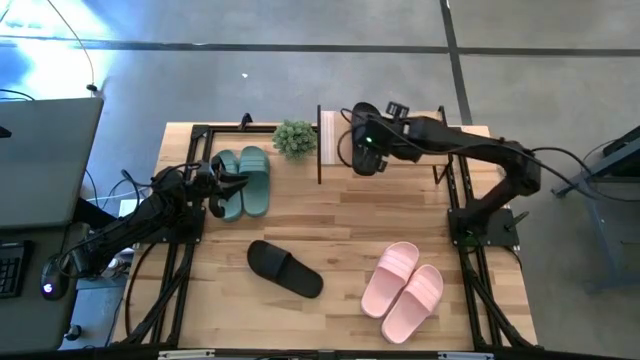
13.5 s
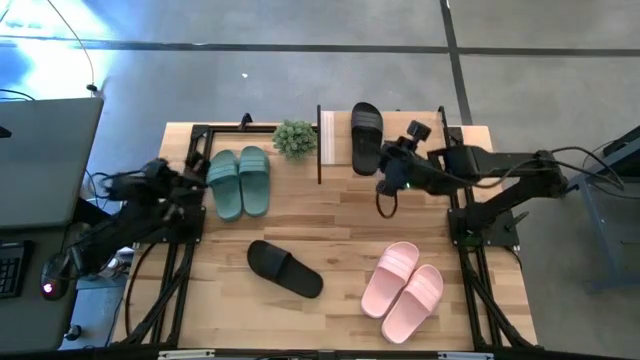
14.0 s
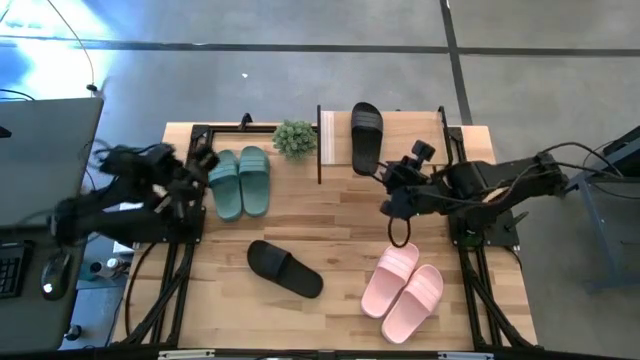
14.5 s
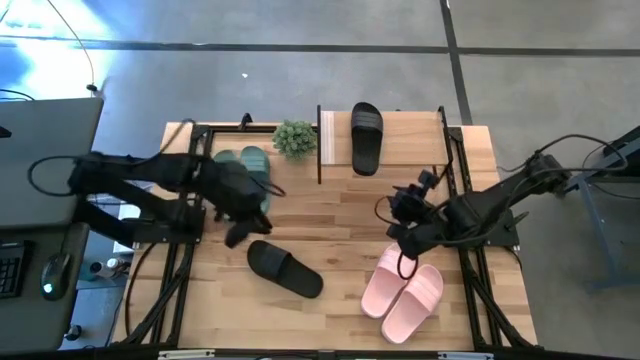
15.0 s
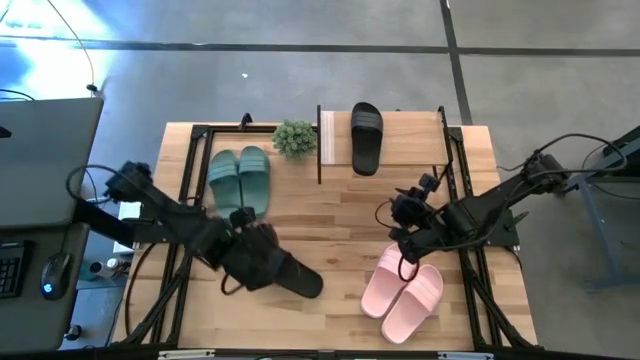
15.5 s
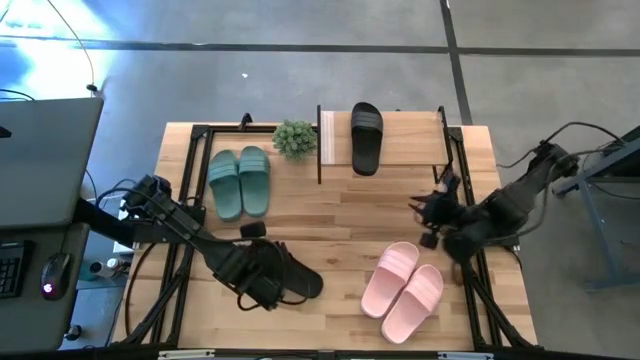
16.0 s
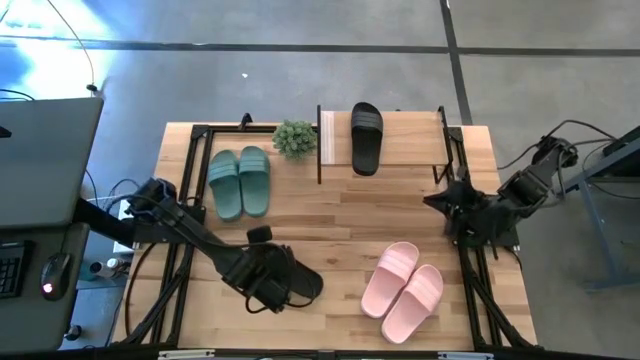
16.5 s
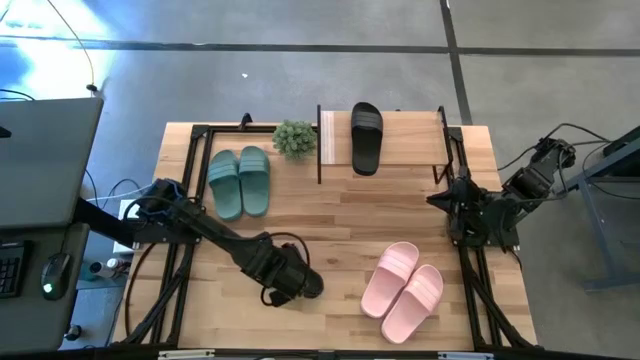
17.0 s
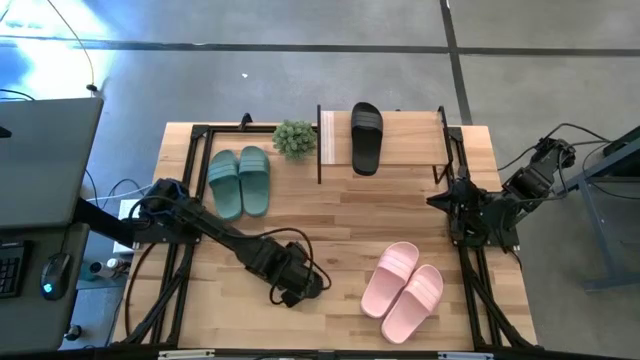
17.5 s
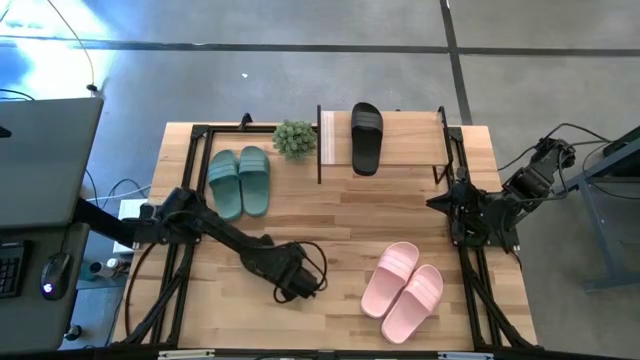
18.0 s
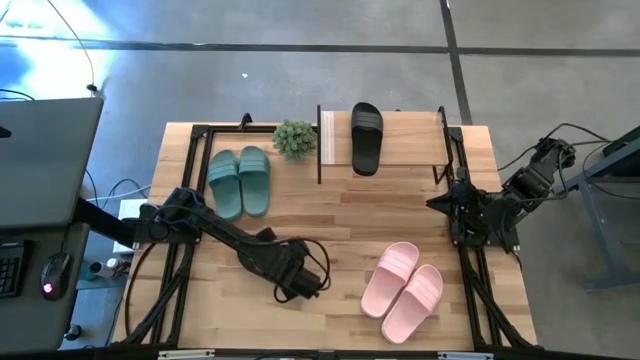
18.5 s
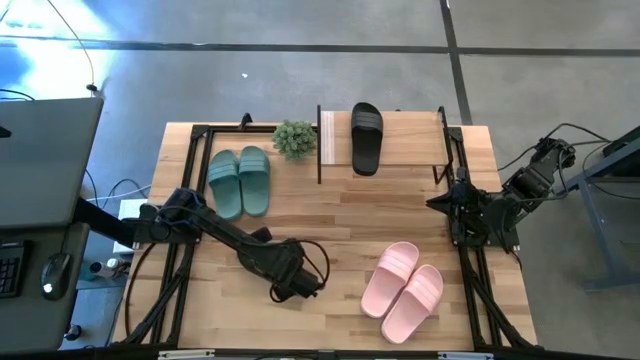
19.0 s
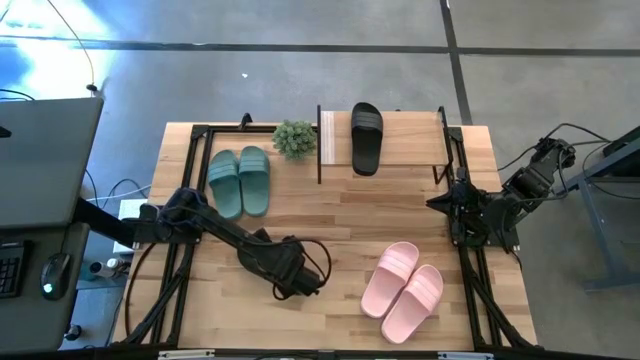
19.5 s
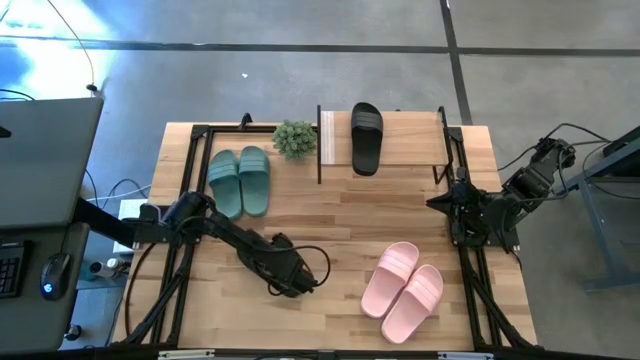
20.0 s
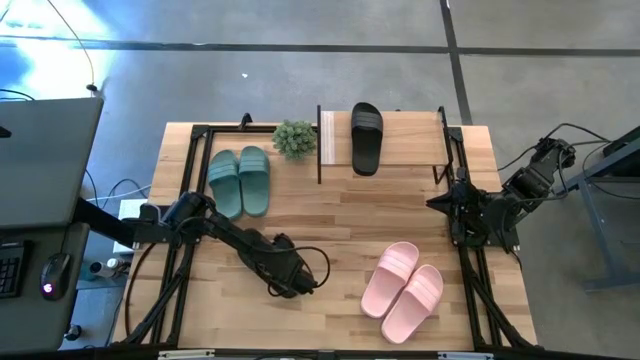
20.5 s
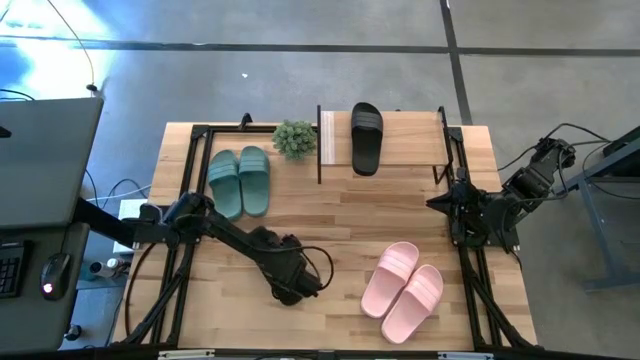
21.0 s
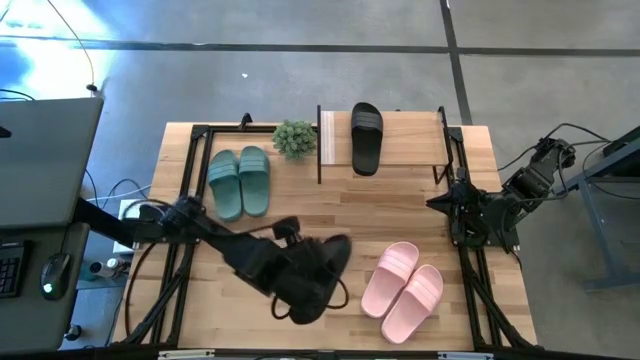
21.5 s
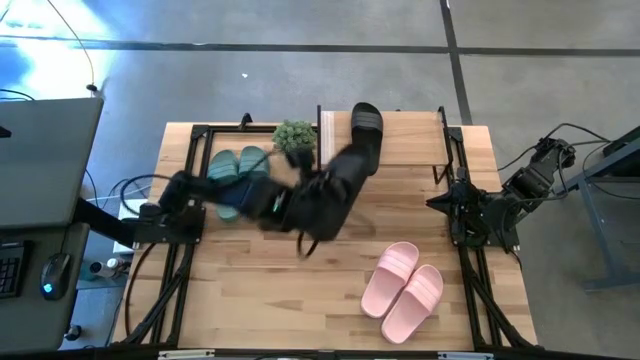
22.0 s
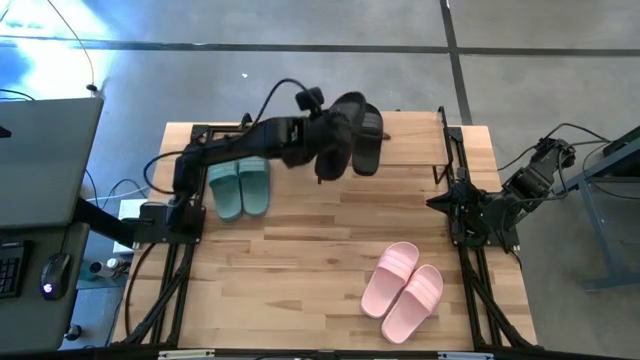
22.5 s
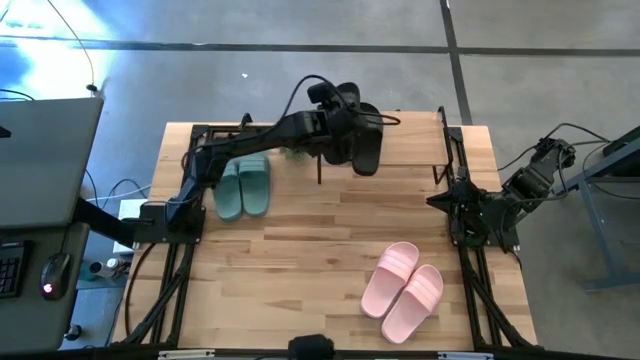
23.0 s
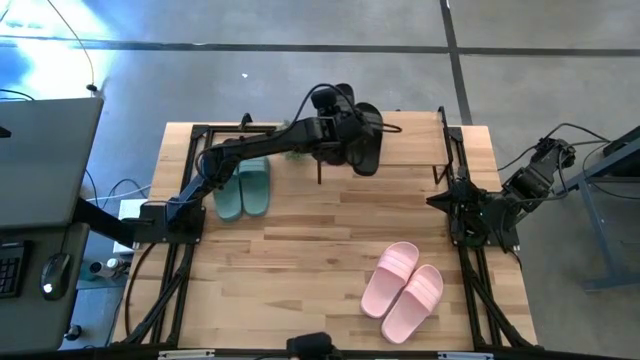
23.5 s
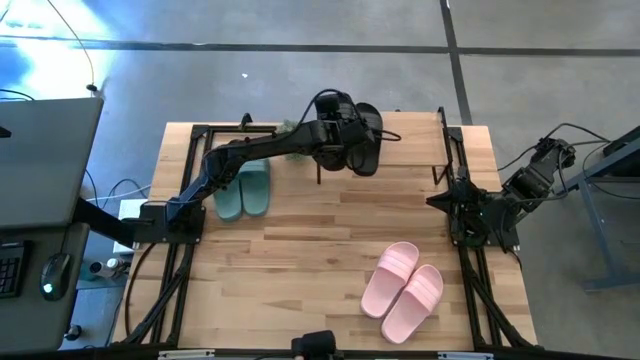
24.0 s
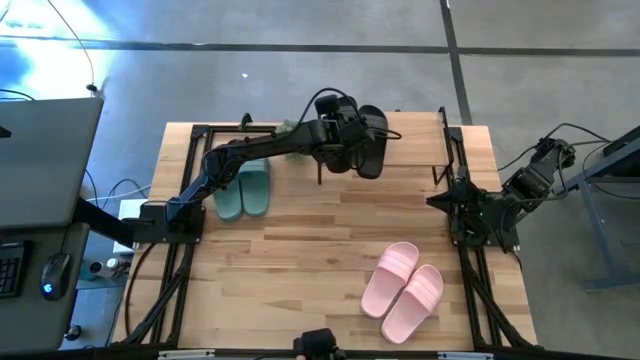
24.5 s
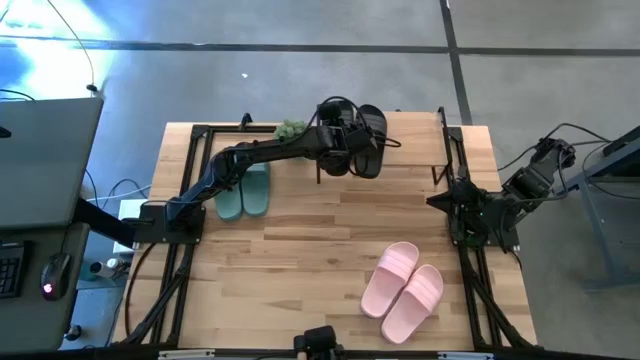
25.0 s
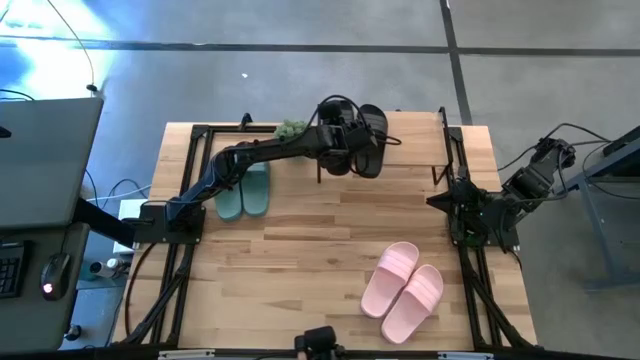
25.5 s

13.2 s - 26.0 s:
Task: Pick and place slides into the shelf
Put the black slide on the shelf

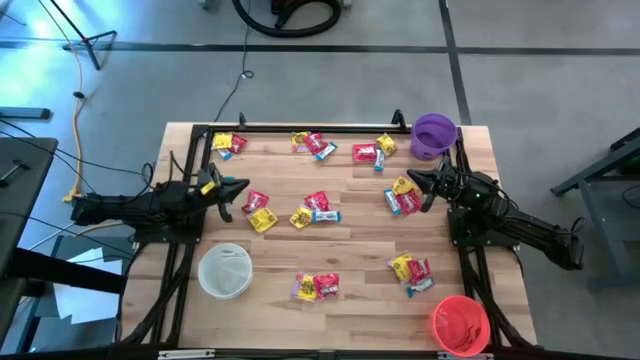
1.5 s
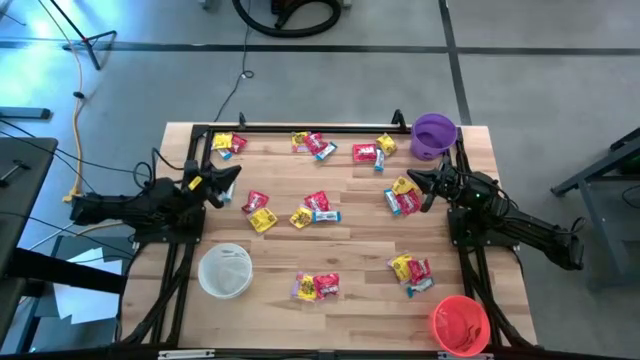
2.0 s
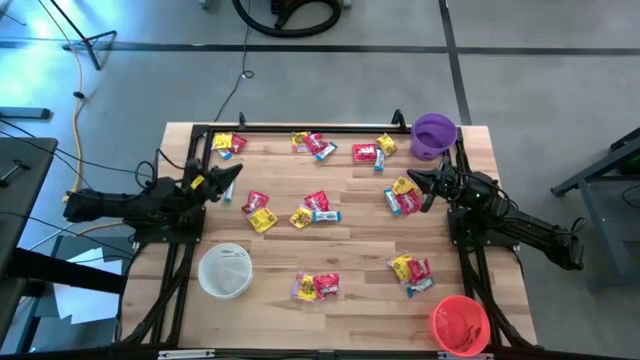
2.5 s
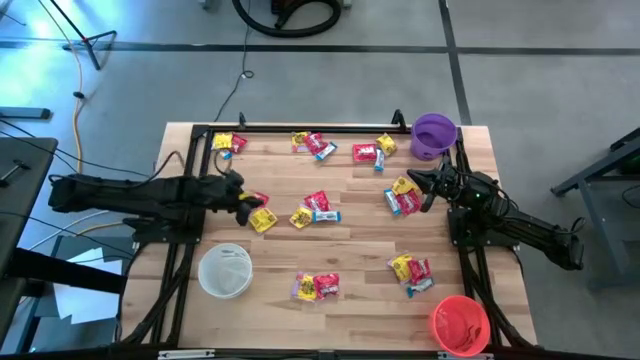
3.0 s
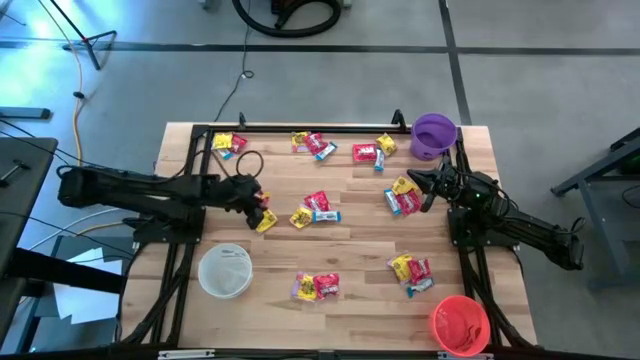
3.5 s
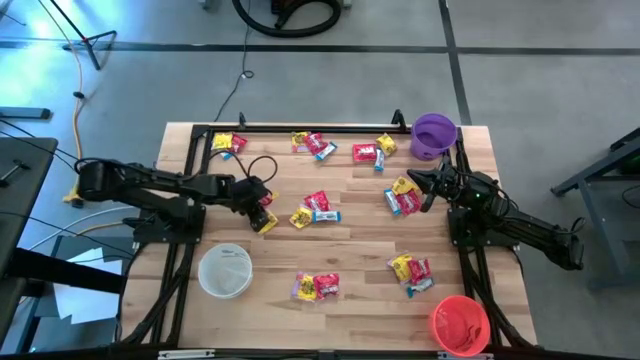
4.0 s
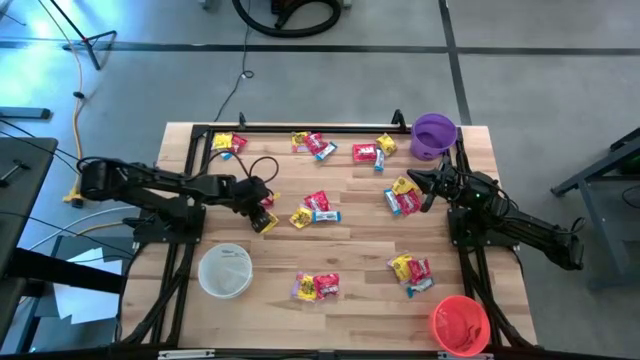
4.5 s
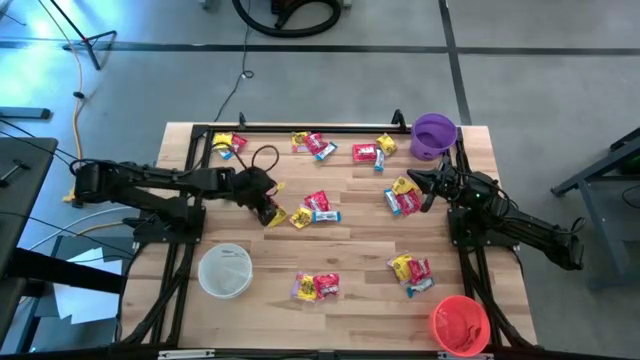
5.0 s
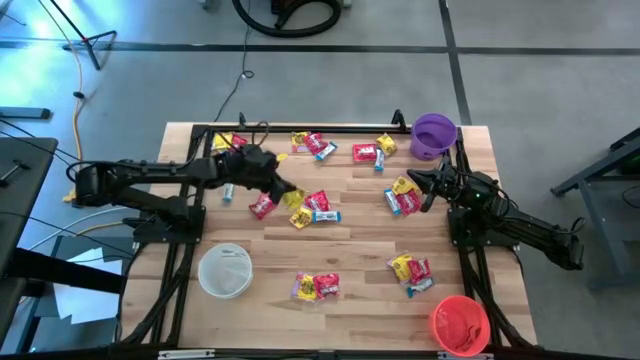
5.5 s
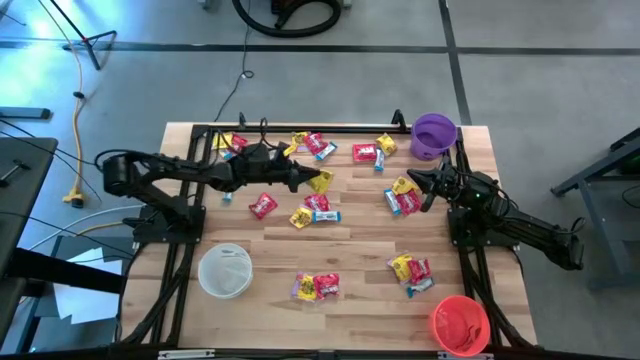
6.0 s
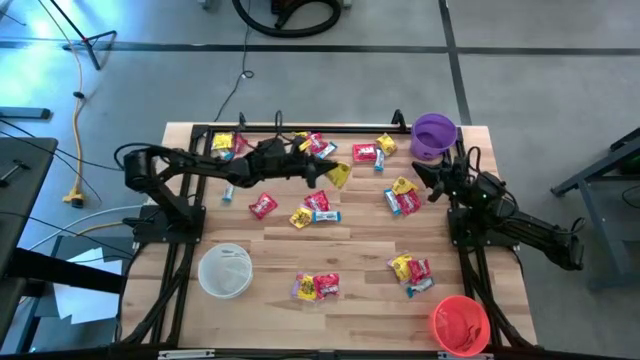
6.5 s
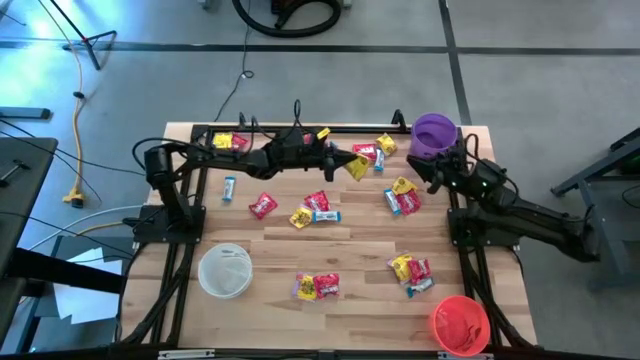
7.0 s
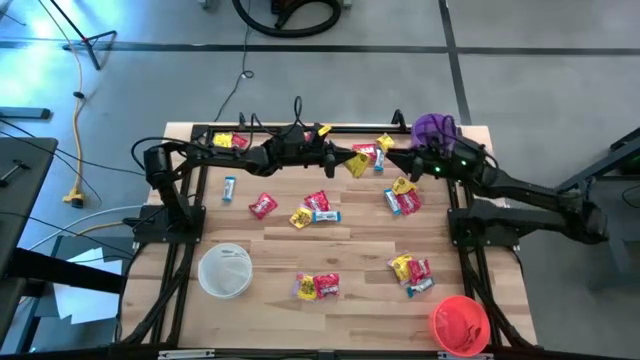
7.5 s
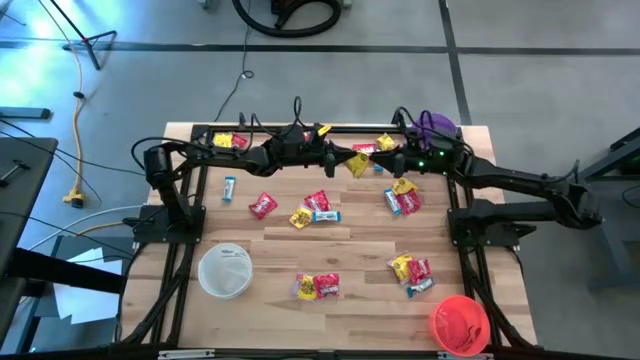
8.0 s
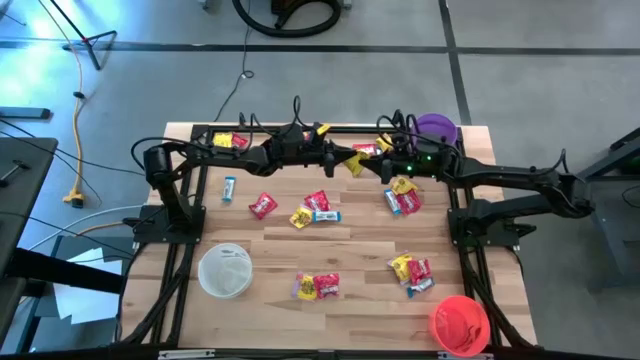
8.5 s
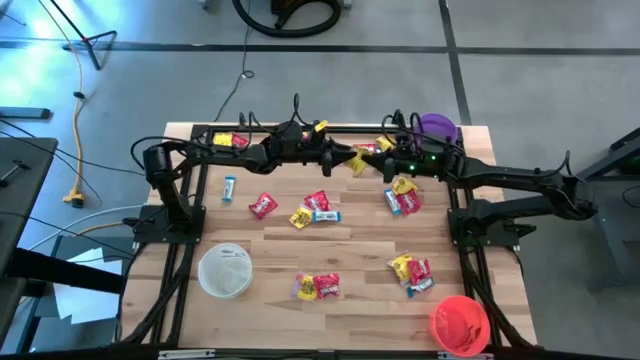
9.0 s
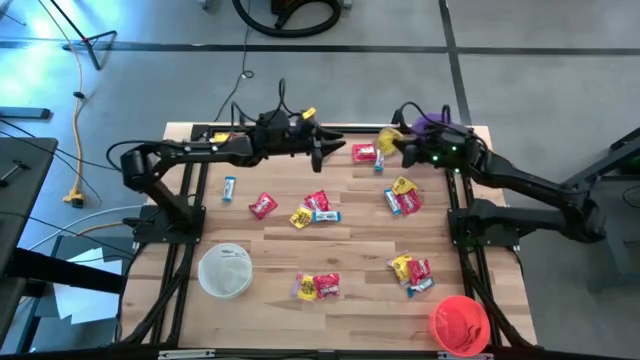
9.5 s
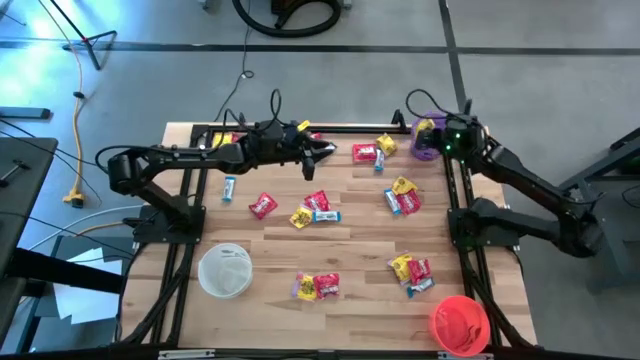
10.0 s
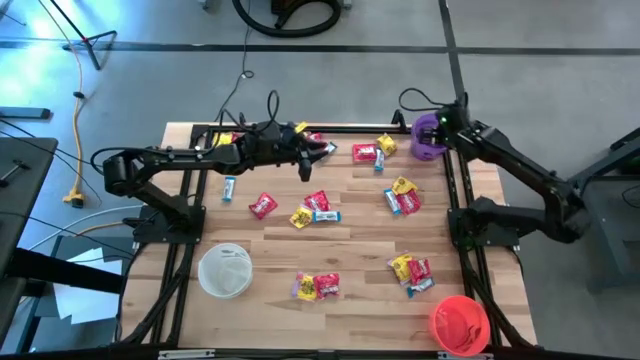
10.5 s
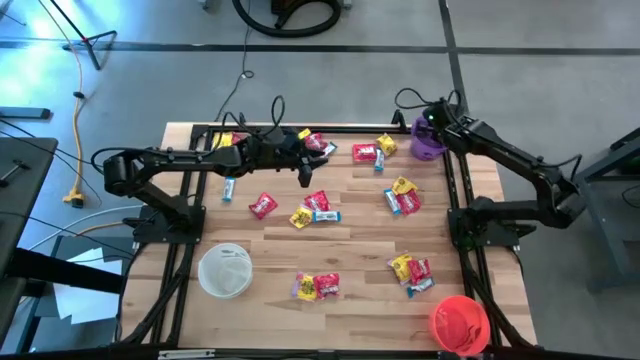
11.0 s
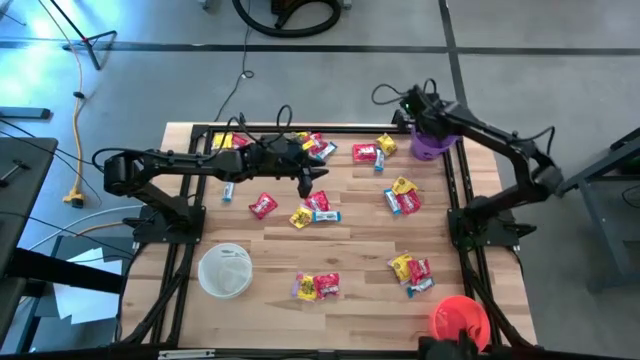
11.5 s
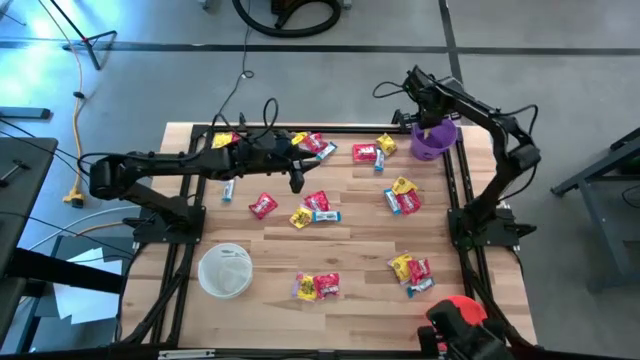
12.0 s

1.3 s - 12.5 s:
Task: Sort candy
Put the yellow candy into the purple bin
